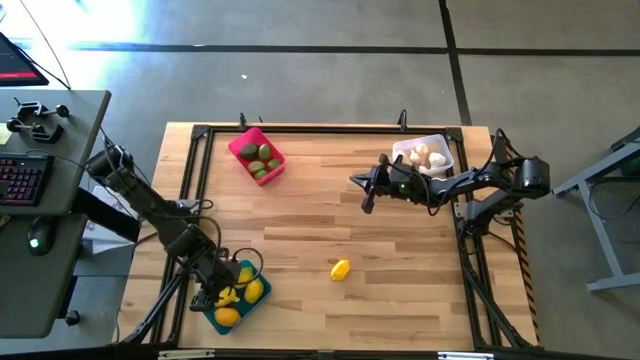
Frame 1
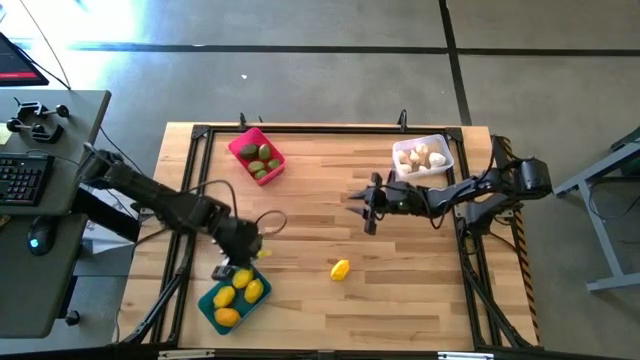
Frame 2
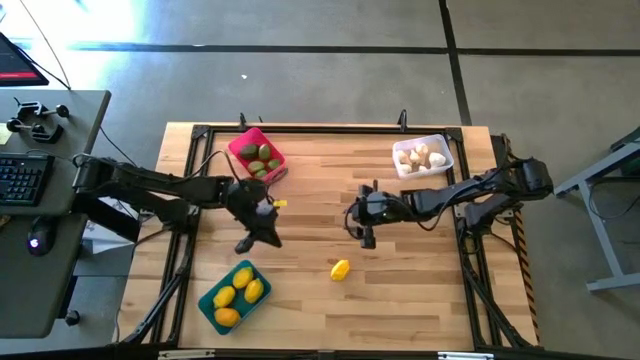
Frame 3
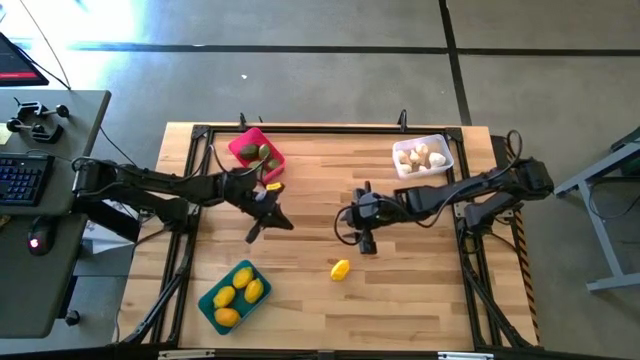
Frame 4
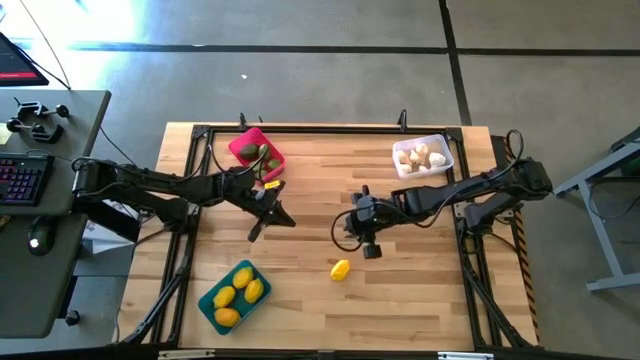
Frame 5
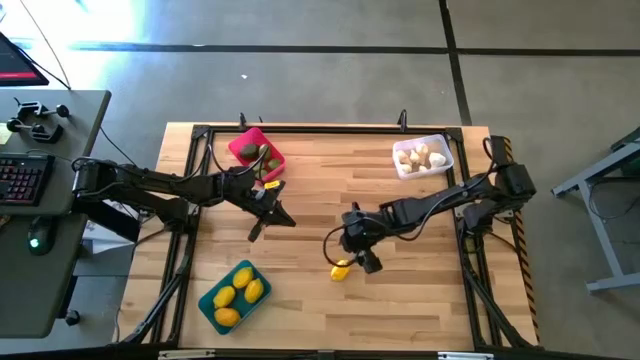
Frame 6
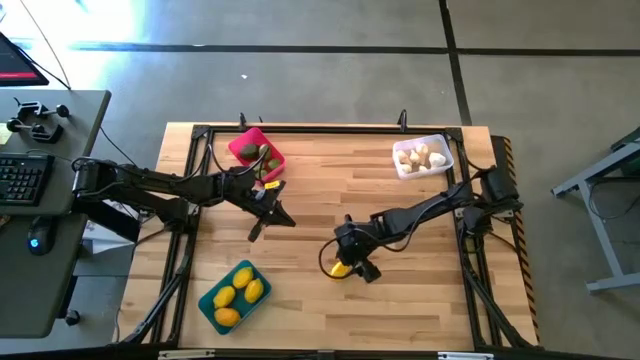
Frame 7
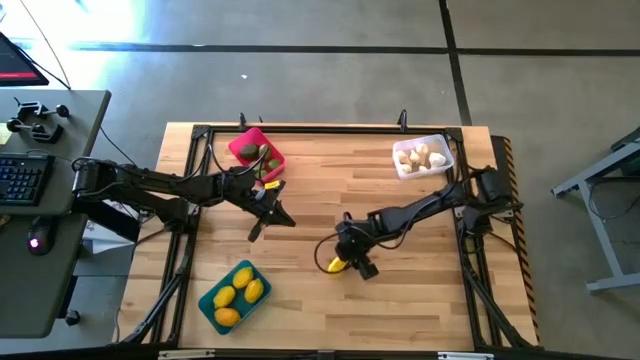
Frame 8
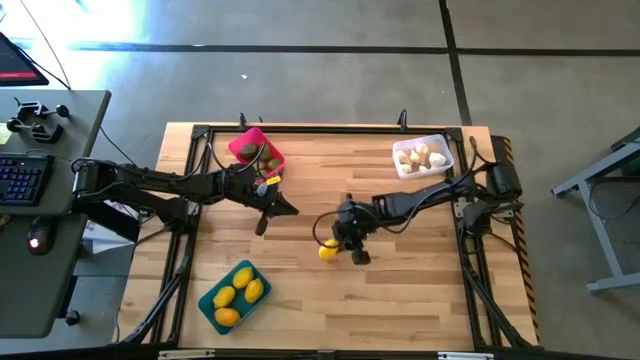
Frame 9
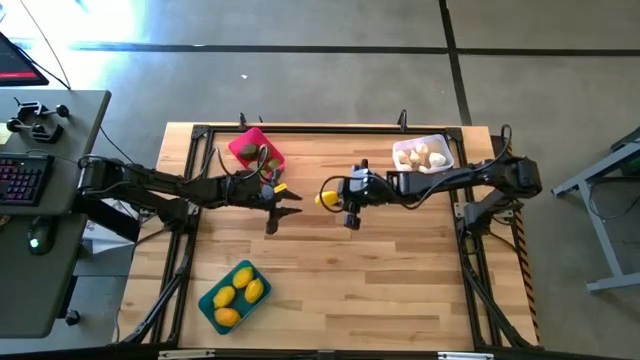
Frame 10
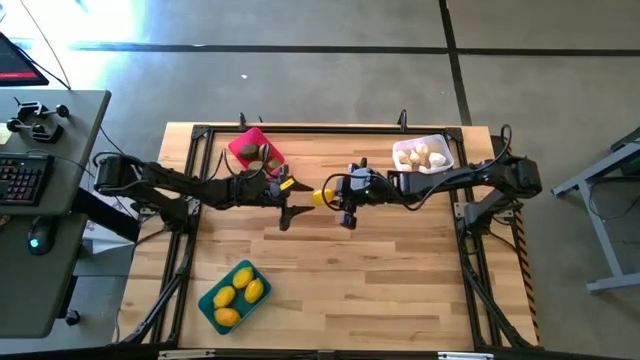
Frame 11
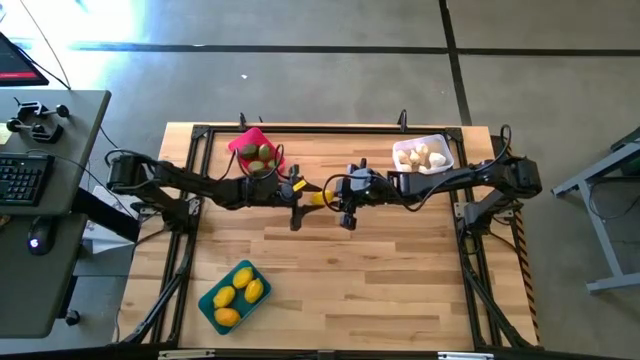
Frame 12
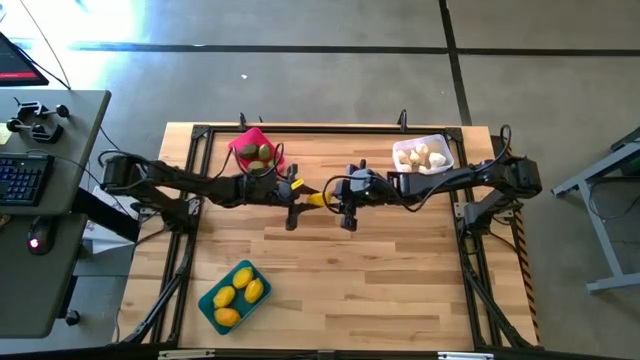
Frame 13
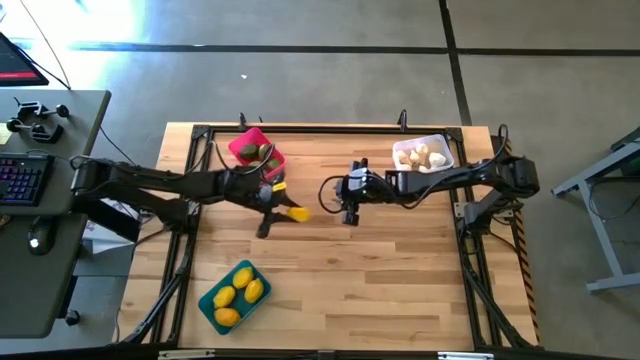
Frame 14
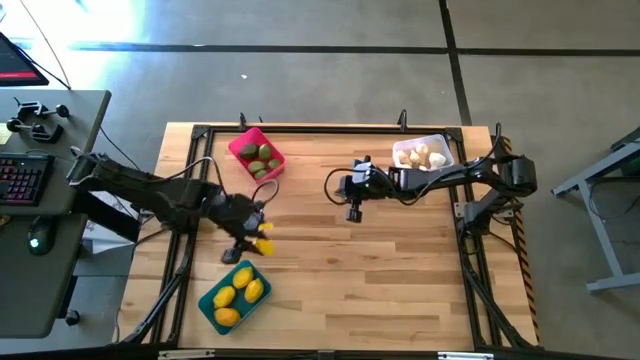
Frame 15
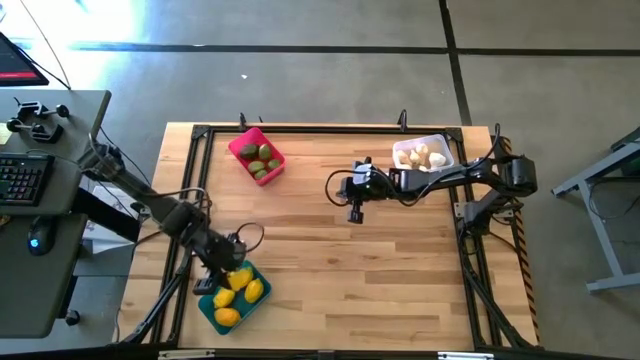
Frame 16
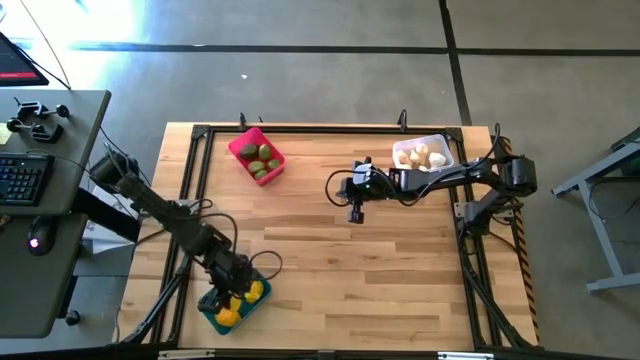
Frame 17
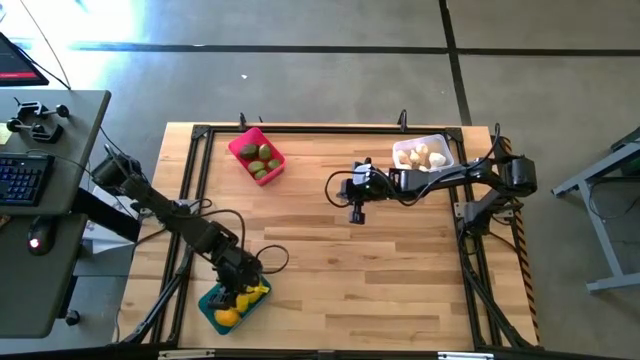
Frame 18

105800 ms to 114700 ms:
Task: Sort produce into baskets
Put the yellow lemon in the blue bin

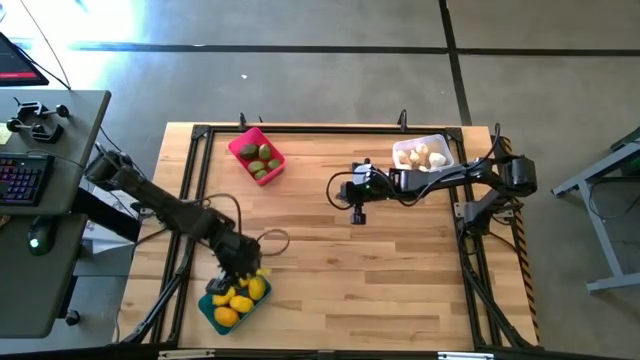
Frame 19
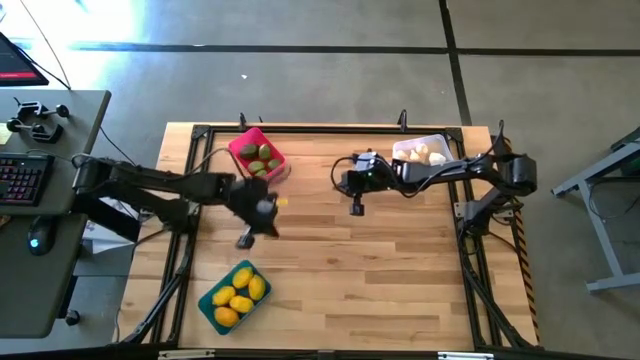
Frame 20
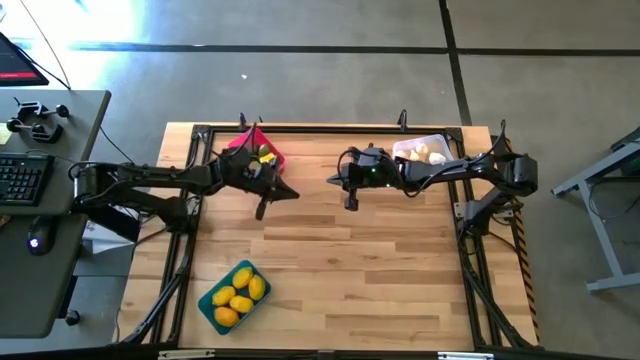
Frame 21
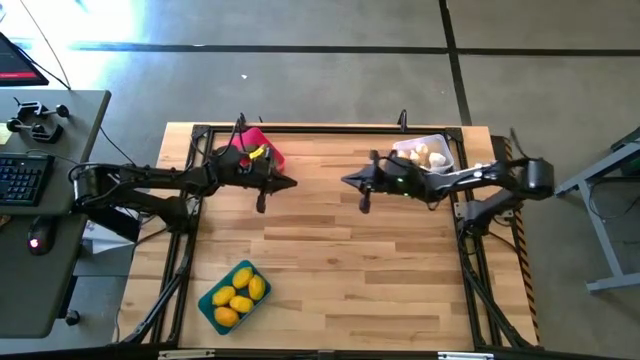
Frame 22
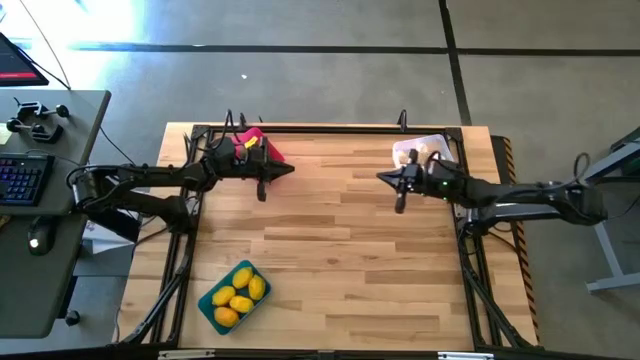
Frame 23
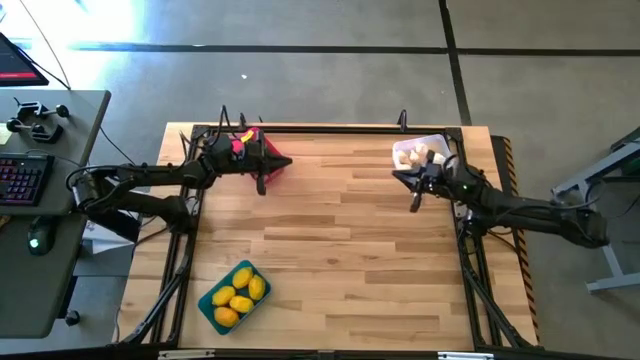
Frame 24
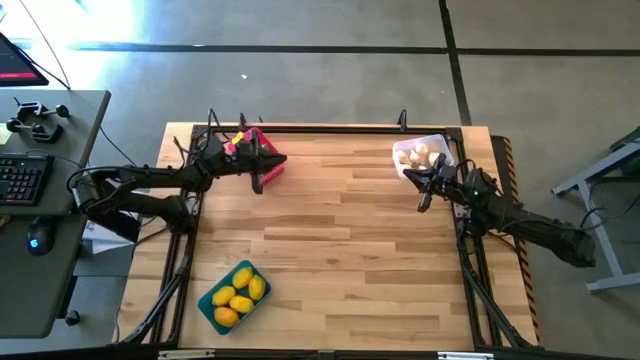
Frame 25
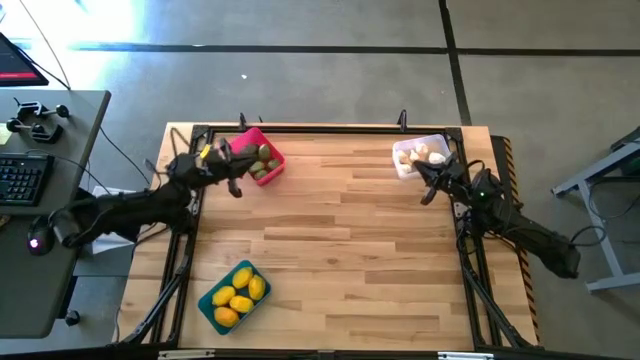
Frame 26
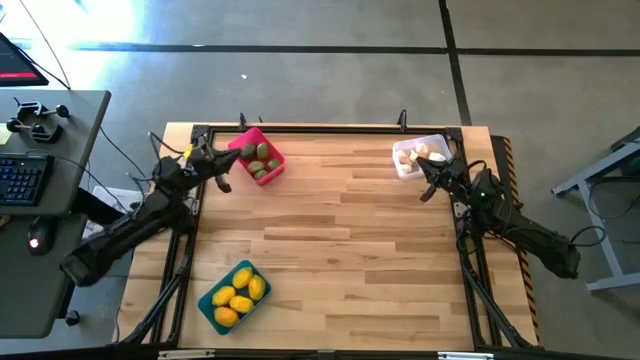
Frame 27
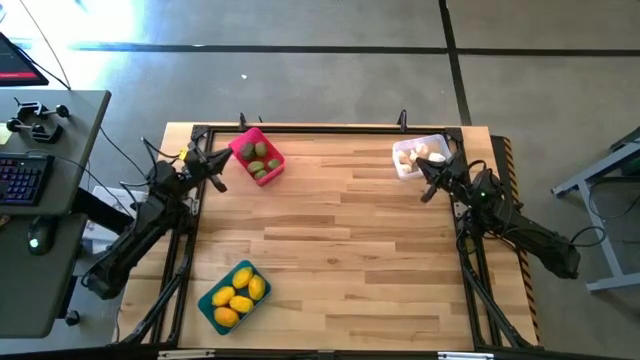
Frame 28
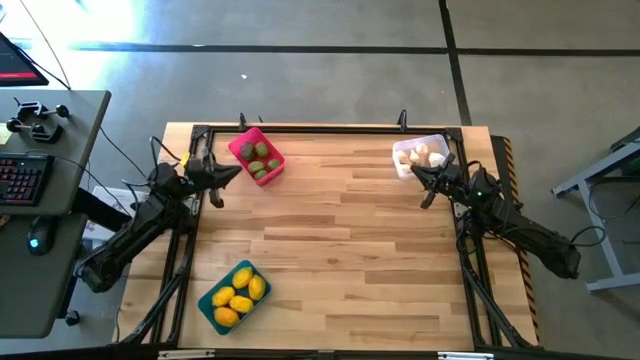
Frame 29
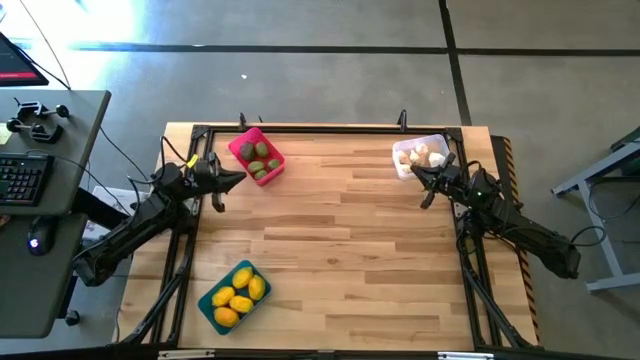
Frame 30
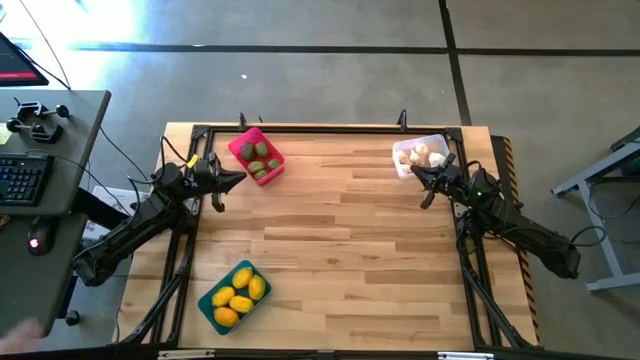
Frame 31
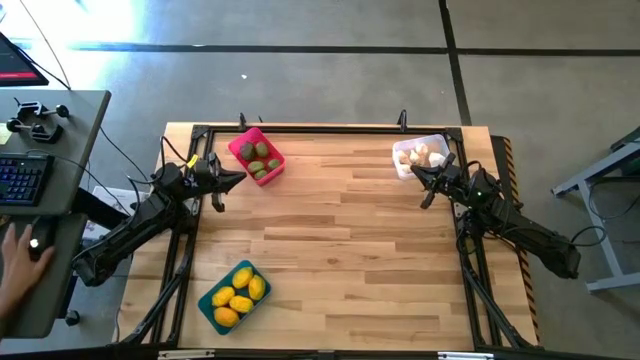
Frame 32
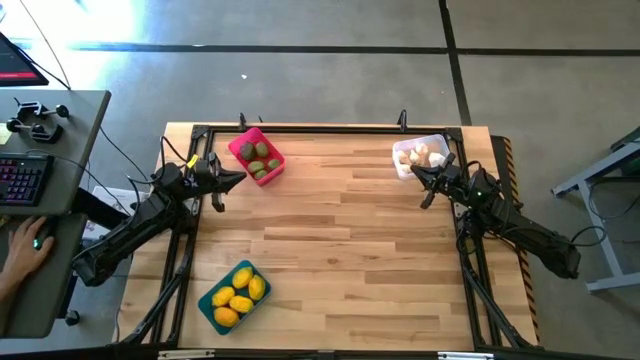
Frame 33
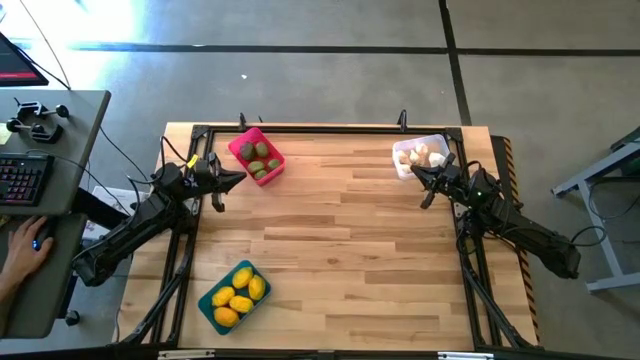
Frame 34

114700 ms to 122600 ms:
Return to Home Position

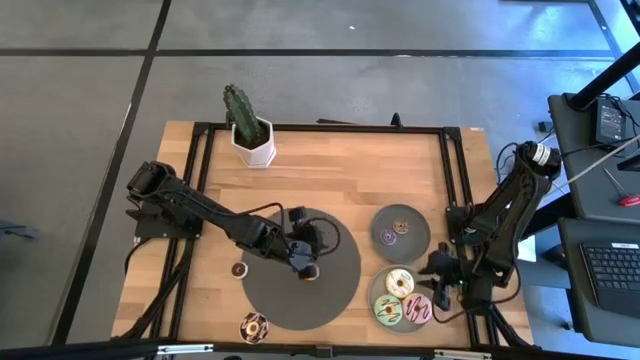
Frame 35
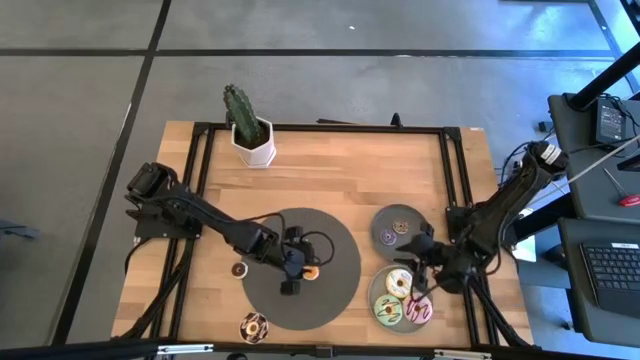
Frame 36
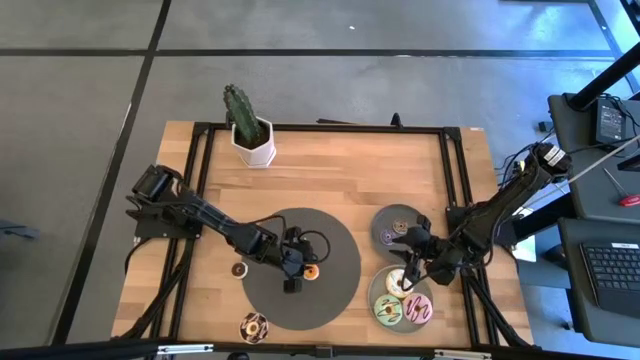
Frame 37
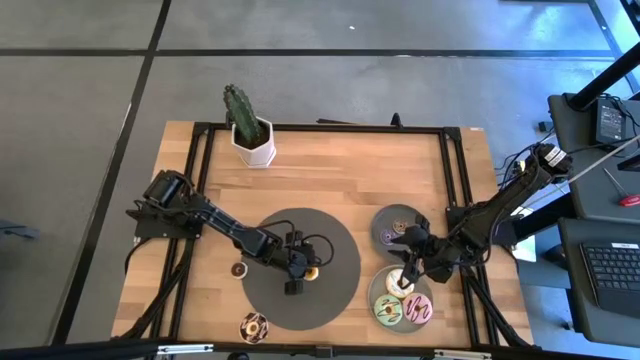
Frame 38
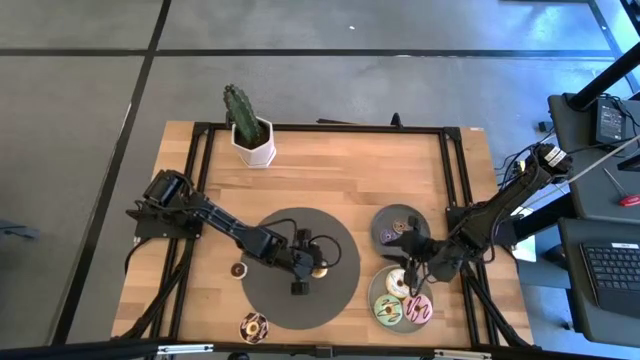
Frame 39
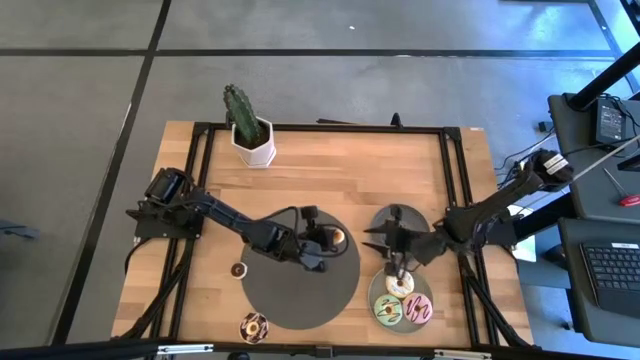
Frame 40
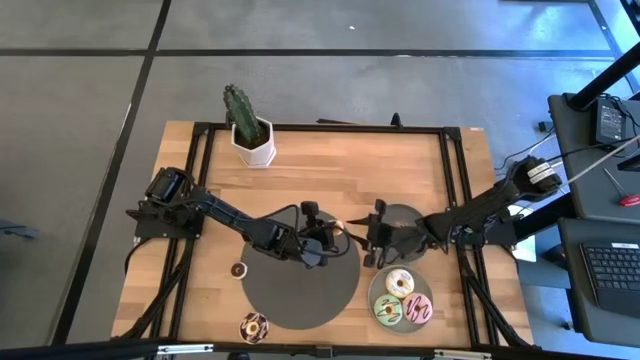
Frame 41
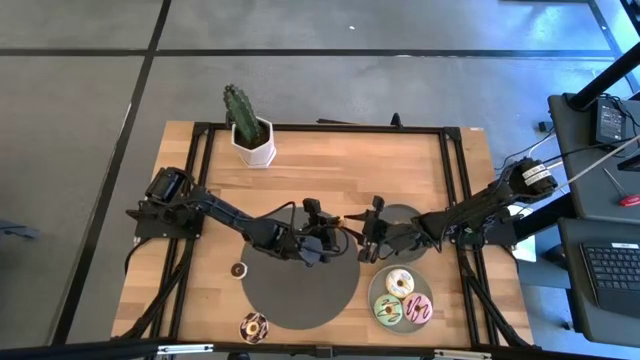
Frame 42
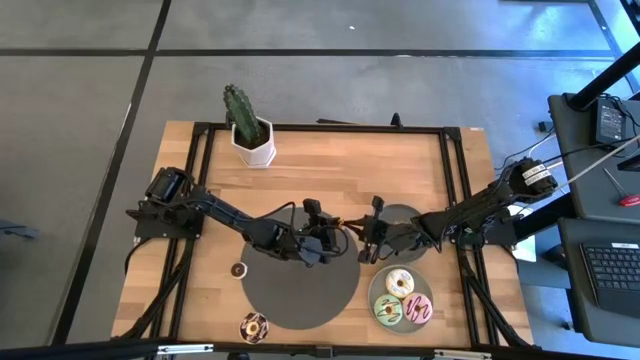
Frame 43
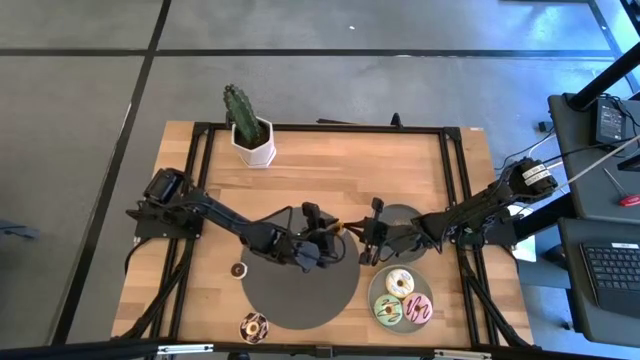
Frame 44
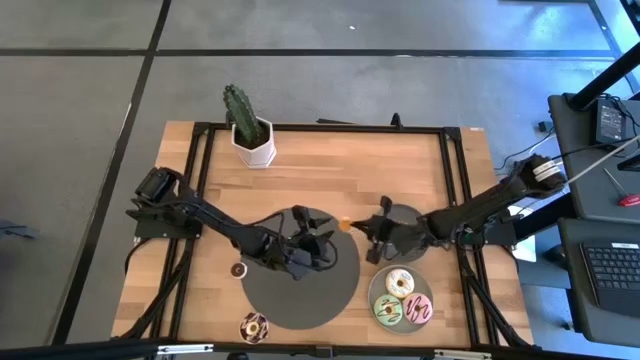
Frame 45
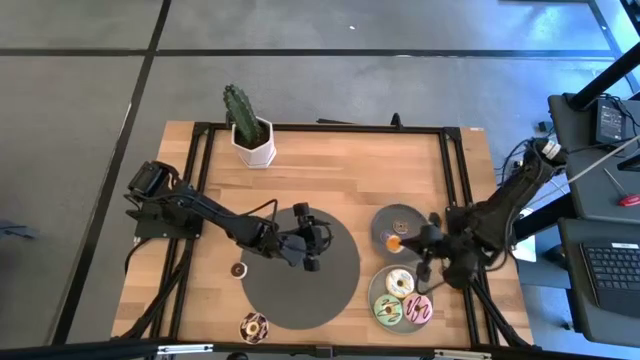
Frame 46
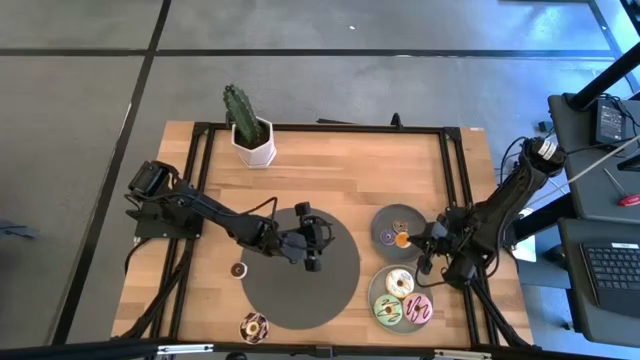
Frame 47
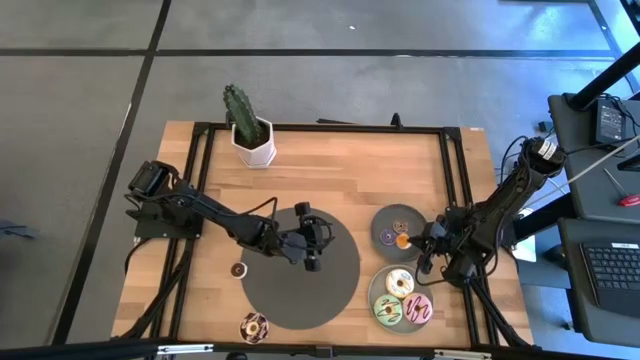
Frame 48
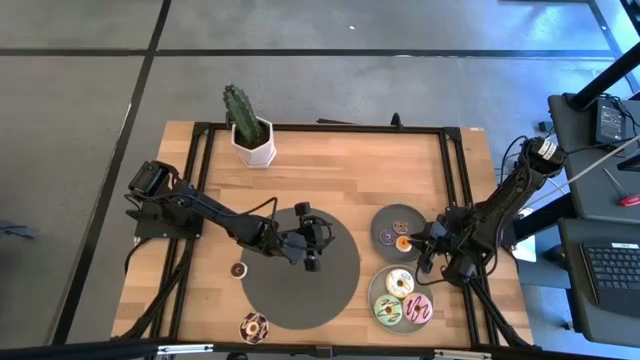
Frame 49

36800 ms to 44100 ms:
Task: Pick & Place donuts
Put the small orange donut on the dark gray plate
